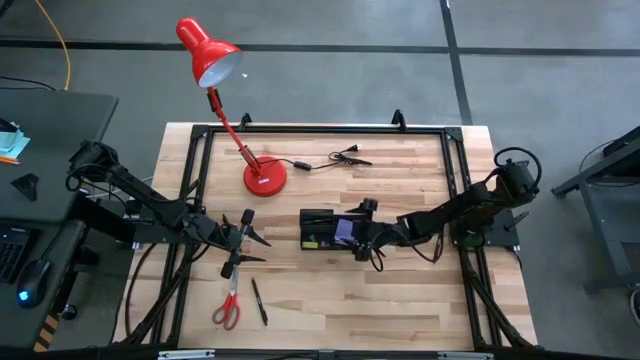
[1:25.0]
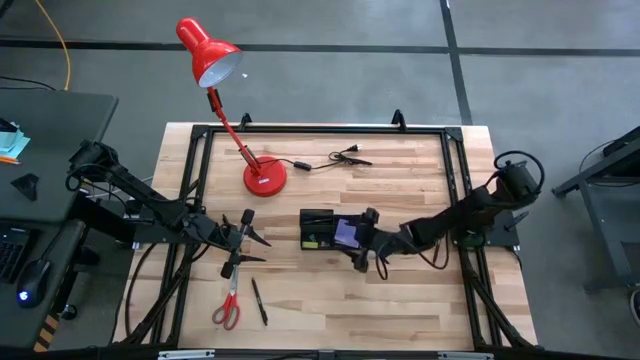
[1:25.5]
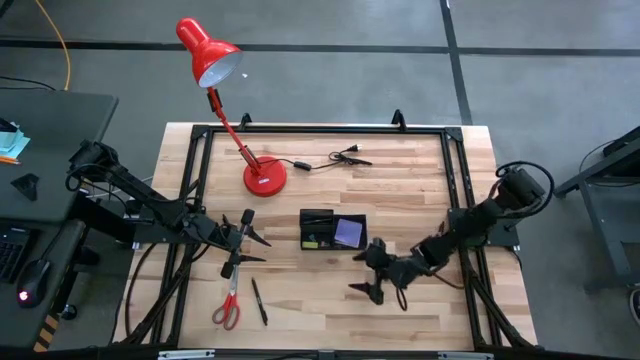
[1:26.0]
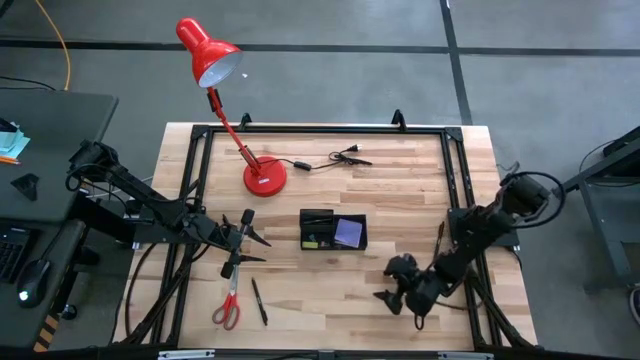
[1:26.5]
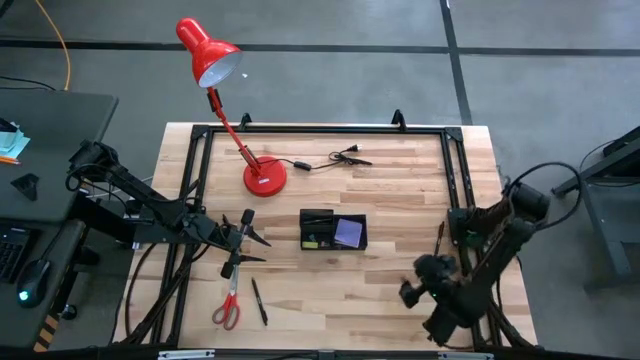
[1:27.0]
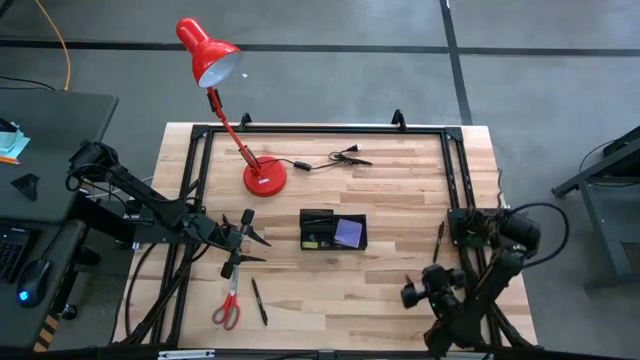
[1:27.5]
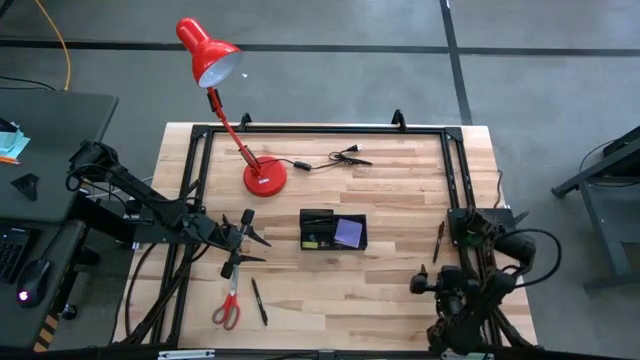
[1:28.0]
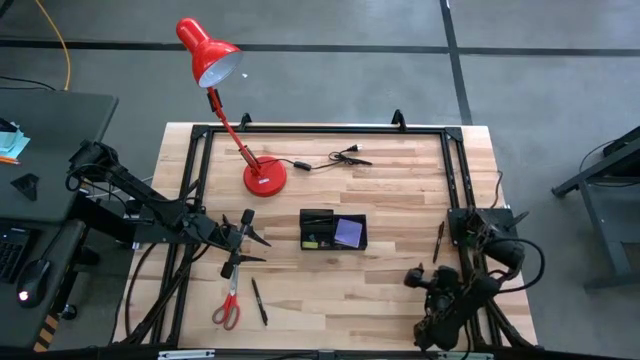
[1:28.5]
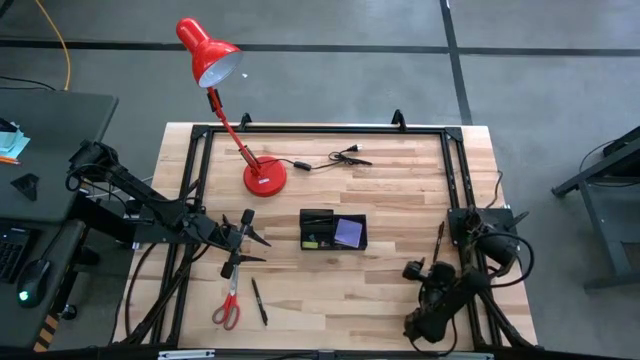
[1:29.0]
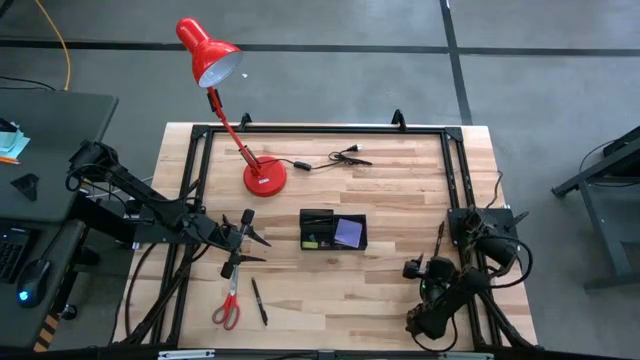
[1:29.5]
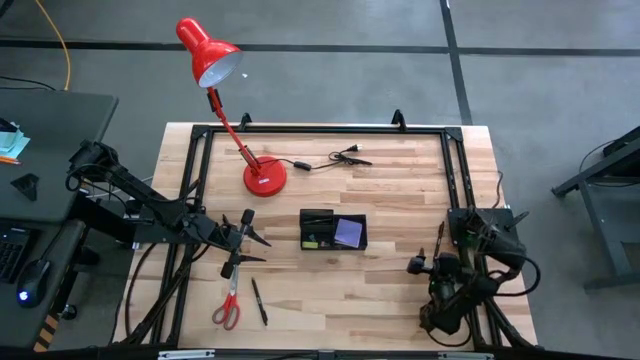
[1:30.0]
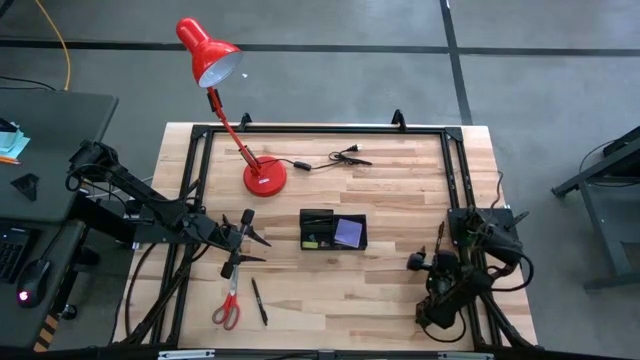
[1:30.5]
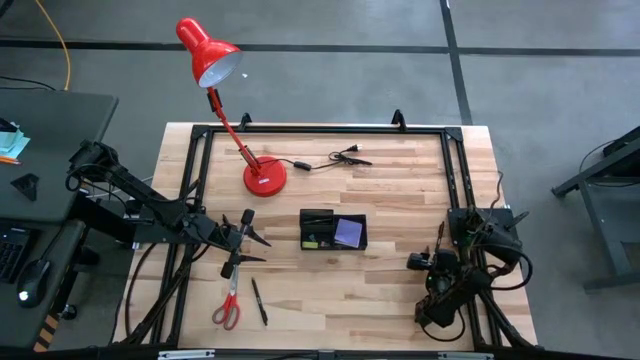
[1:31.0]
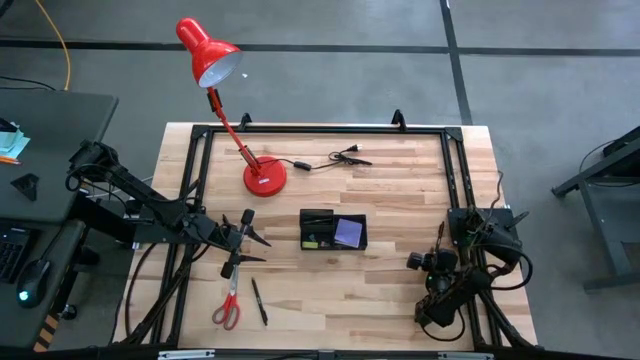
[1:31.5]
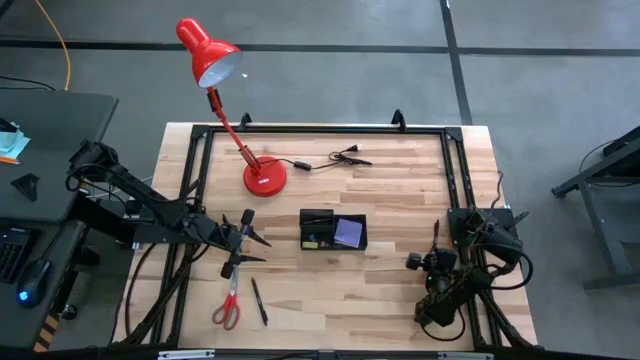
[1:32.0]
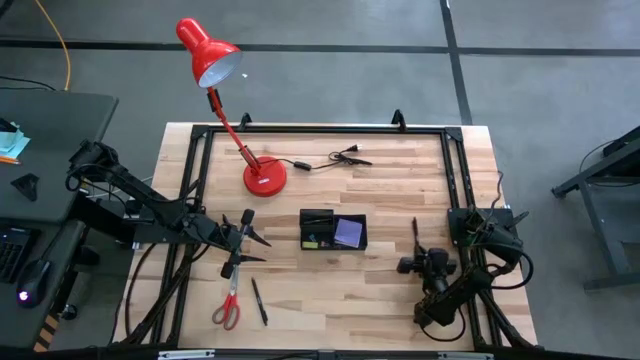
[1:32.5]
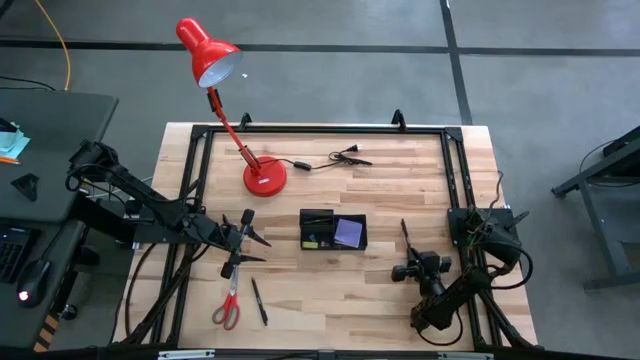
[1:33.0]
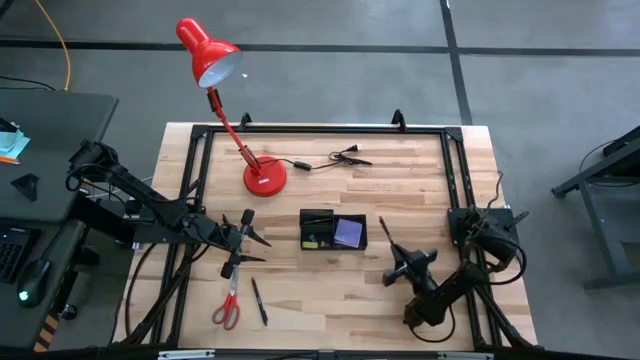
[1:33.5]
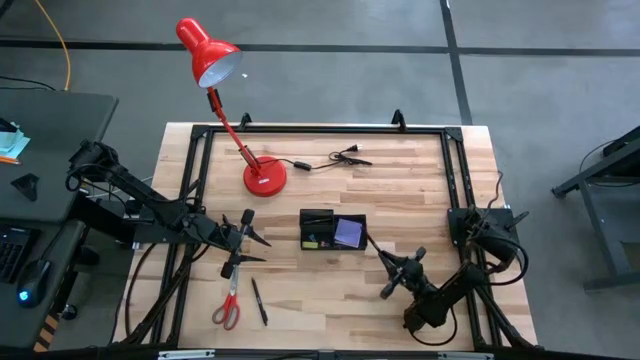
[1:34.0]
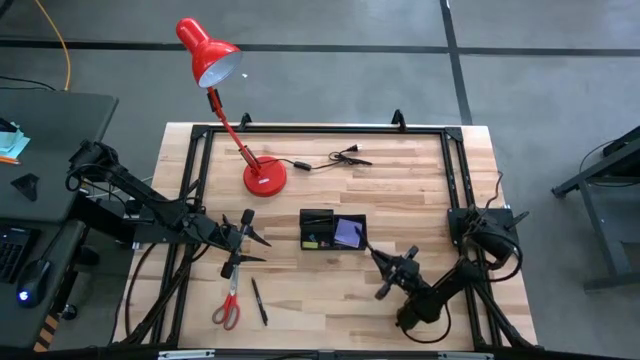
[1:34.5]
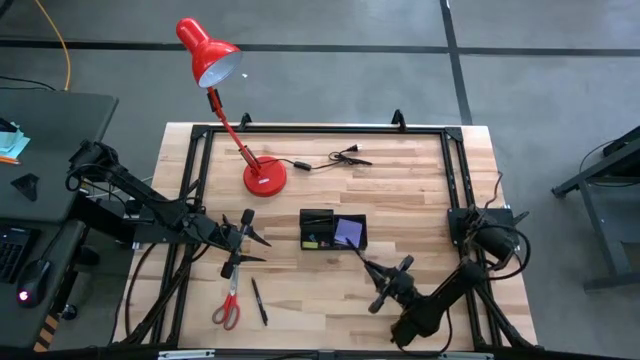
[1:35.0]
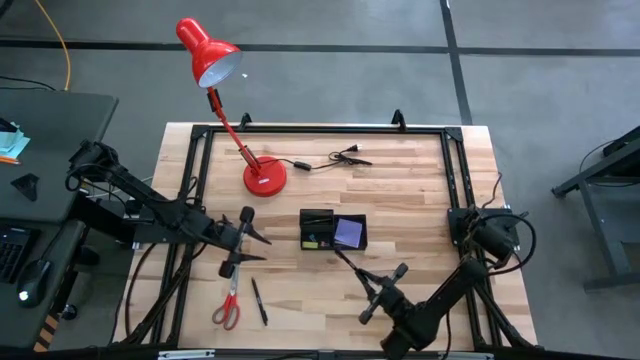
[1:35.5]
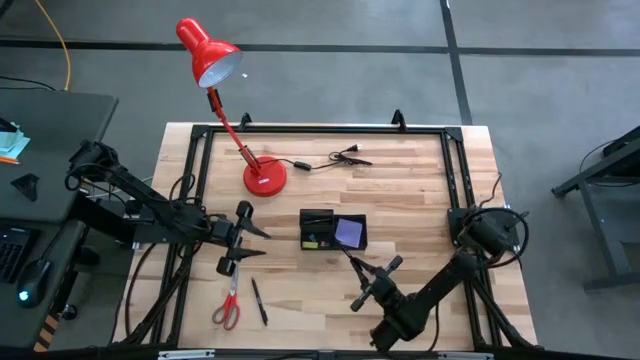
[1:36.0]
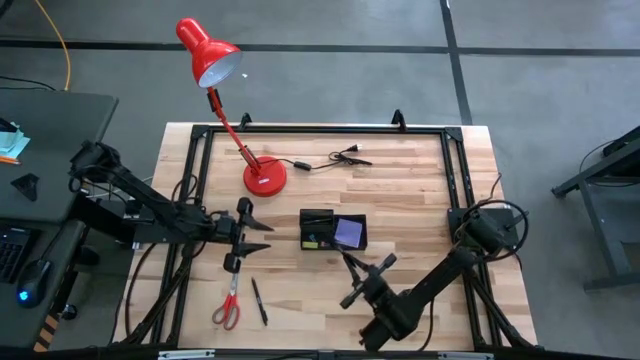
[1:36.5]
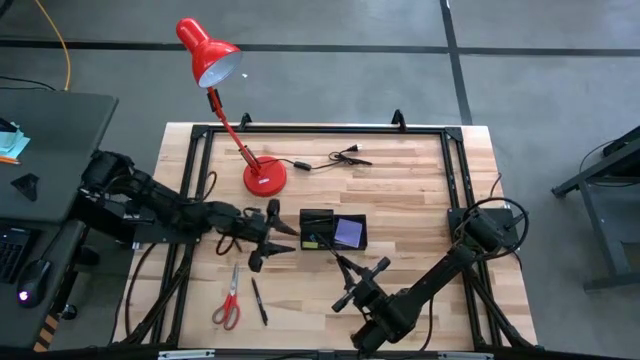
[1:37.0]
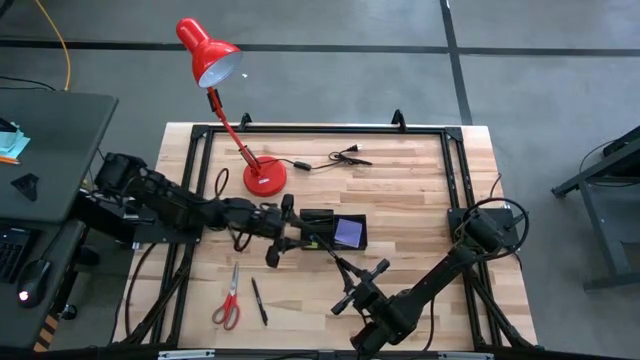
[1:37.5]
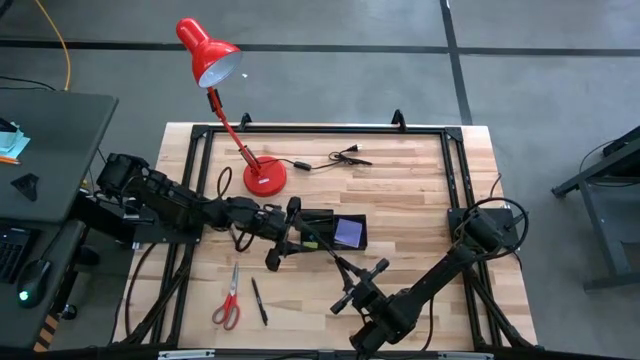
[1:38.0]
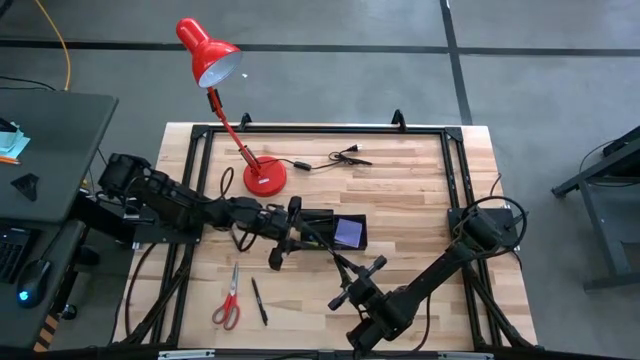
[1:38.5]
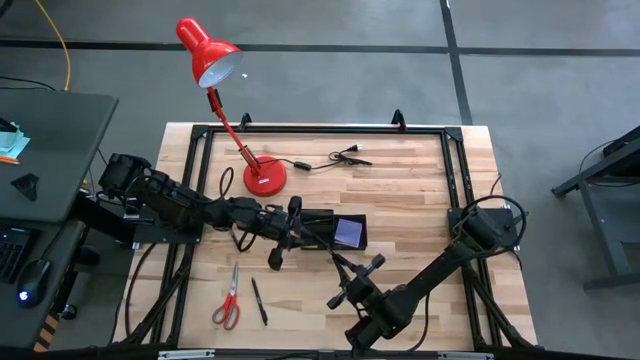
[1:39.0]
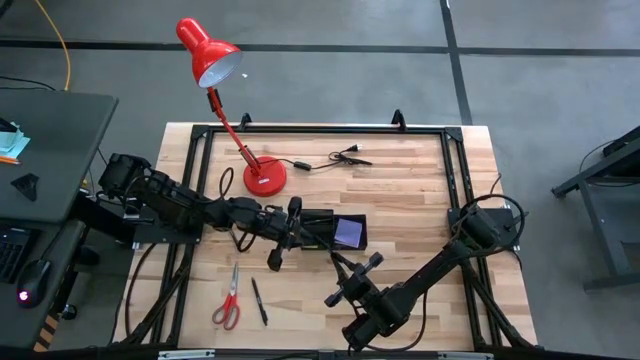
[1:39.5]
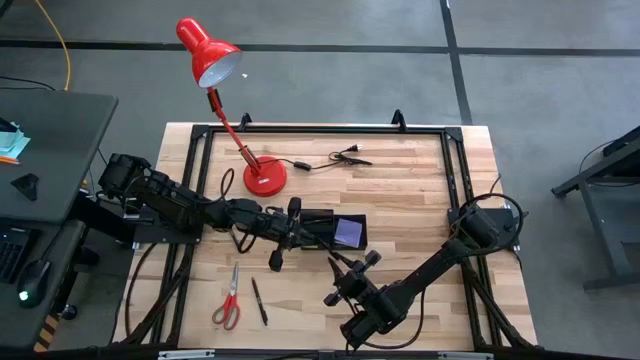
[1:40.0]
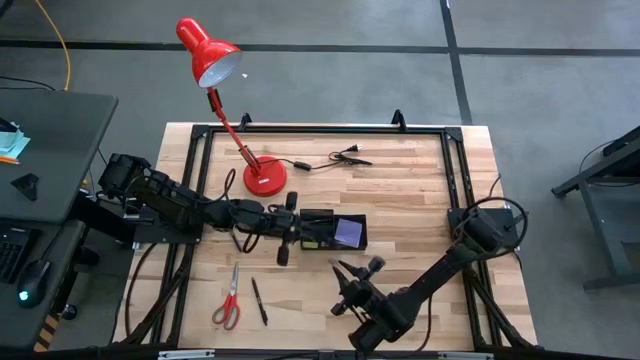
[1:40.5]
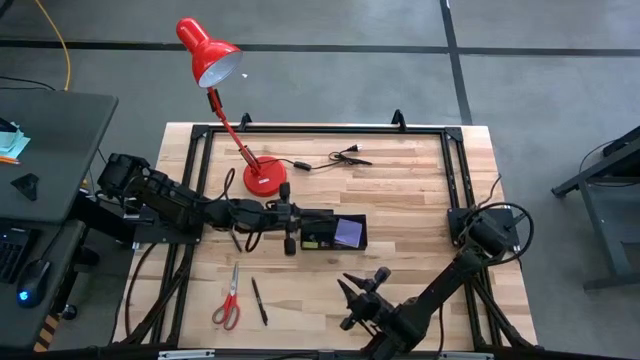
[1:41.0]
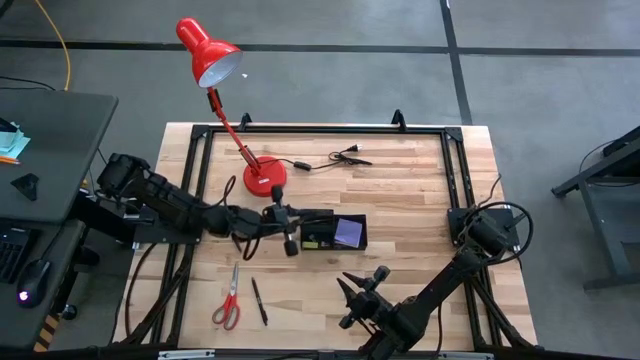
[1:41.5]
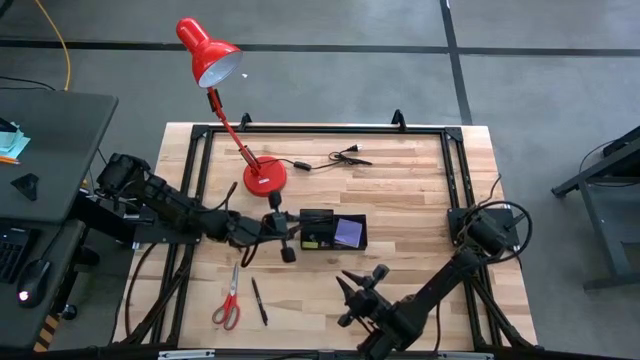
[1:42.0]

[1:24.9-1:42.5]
Task: Pick and place office supplies into organizer
Put the top right black pen into the black desk organizer

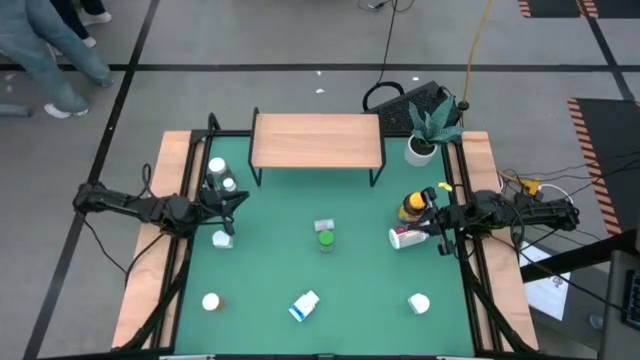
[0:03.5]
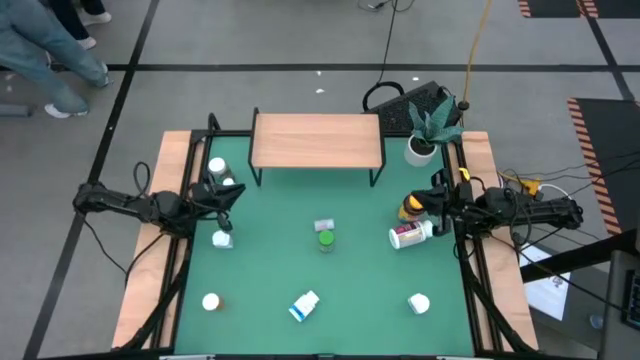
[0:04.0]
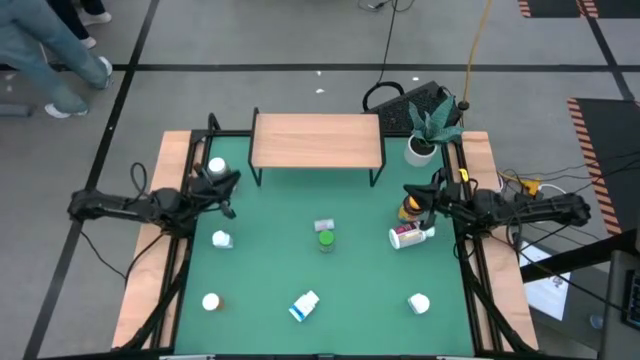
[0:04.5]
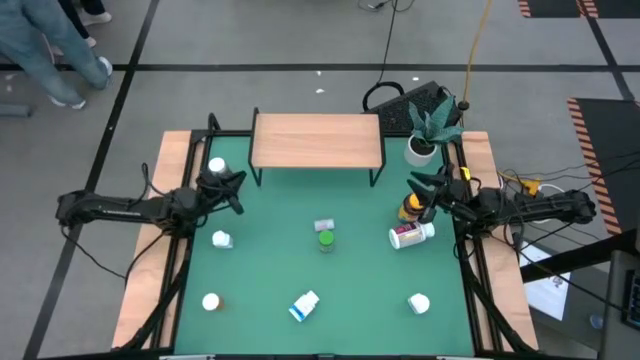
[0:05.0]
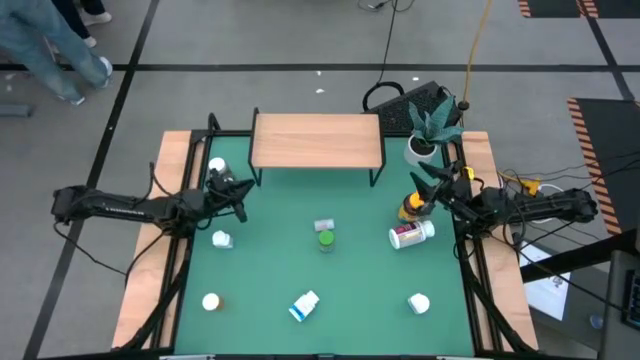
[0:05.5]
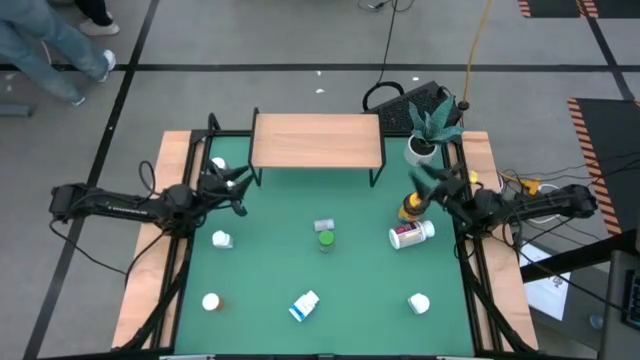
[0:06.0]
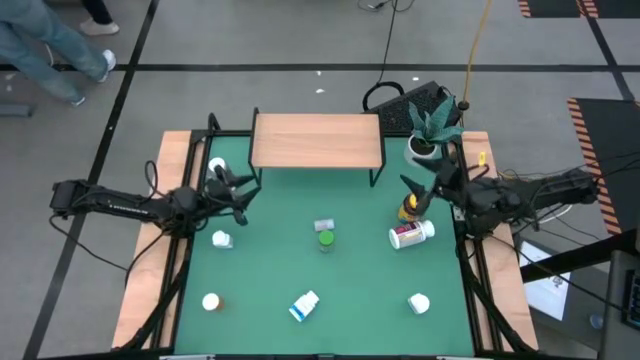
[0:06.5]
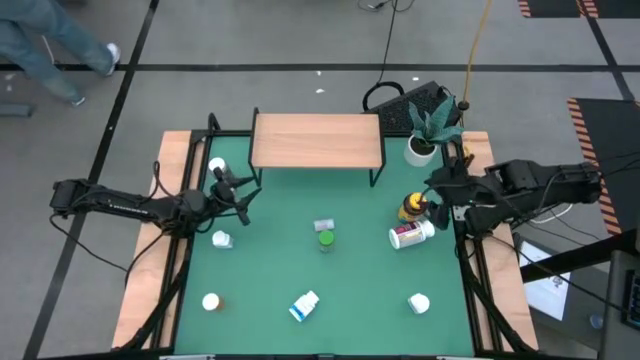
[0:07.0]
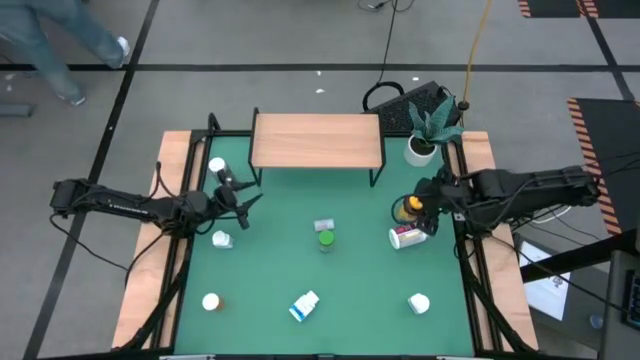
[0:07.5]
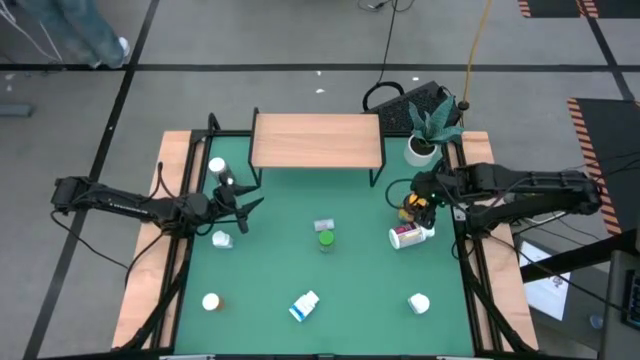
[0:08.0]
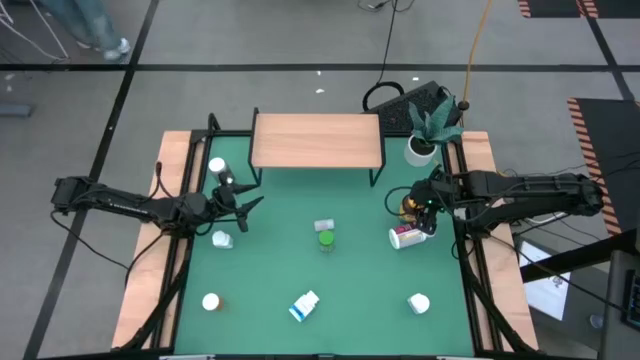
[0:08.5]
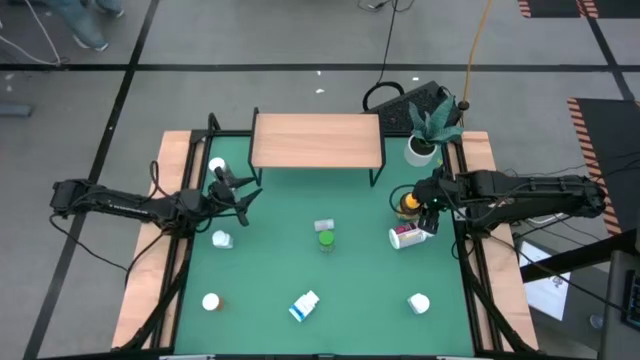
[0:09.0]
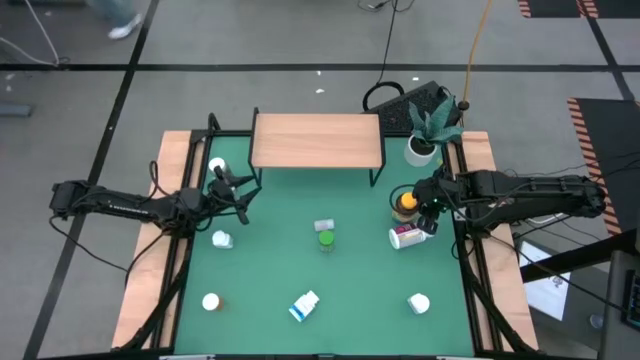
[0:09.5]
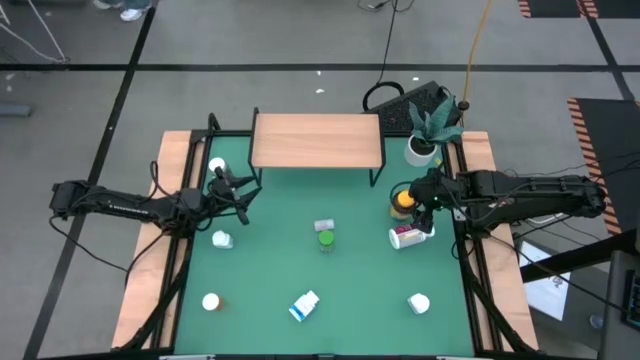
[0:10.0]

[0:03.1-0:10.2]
Task: Pick and place medicine bottles onto shelf by color
Put the yellow pill bottle on the shelf
